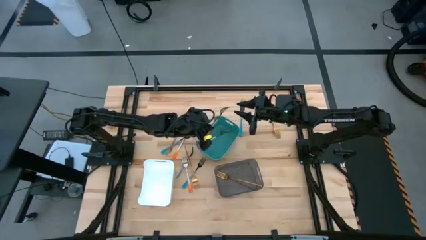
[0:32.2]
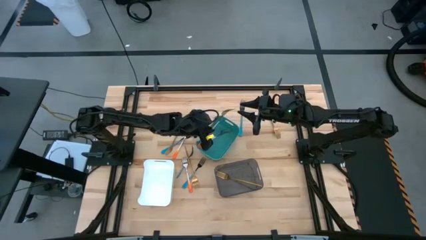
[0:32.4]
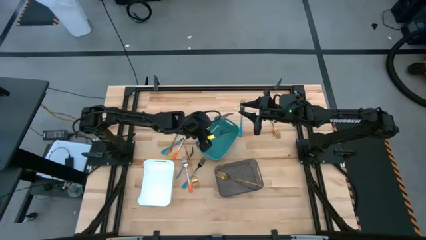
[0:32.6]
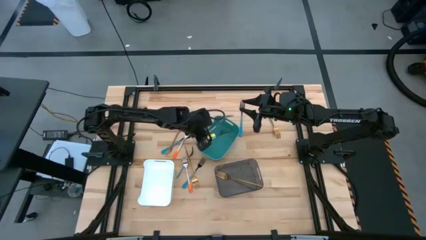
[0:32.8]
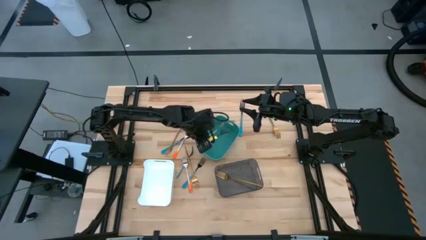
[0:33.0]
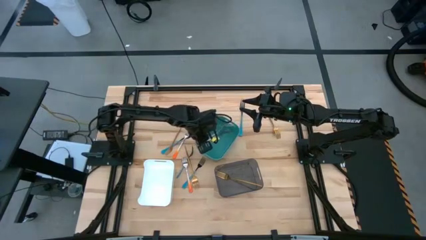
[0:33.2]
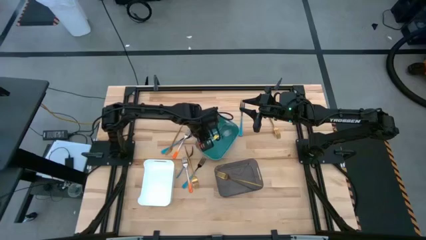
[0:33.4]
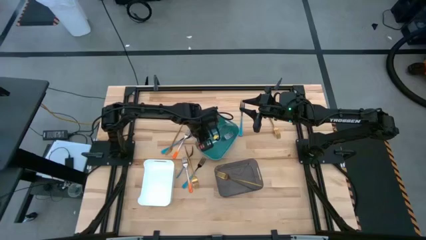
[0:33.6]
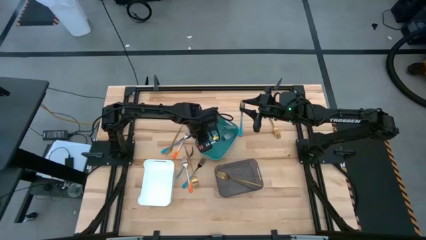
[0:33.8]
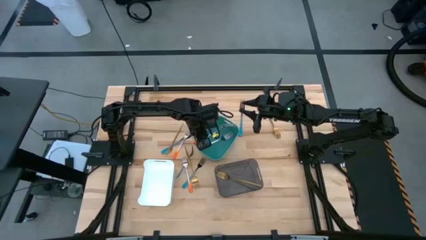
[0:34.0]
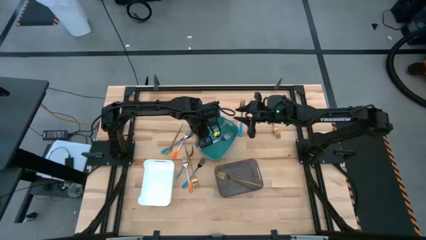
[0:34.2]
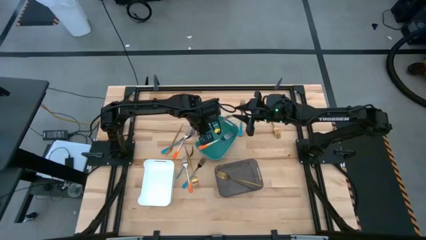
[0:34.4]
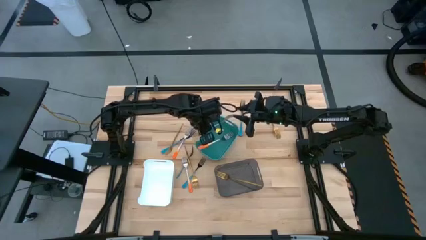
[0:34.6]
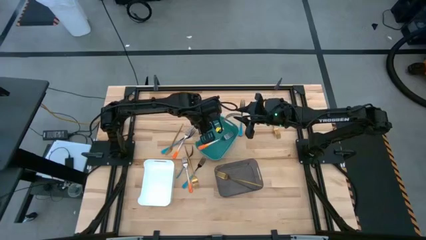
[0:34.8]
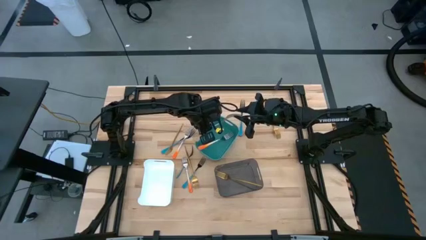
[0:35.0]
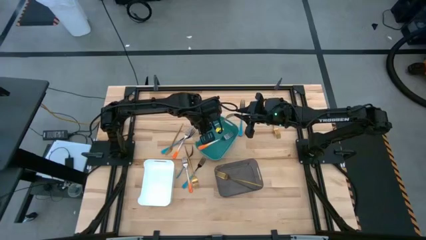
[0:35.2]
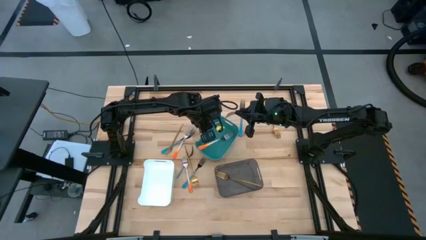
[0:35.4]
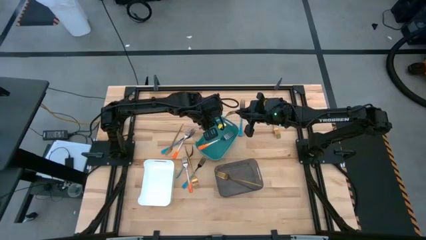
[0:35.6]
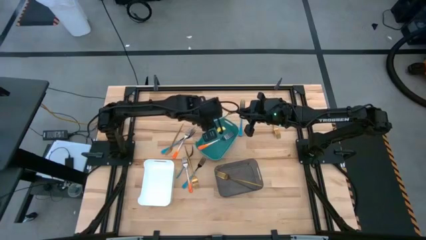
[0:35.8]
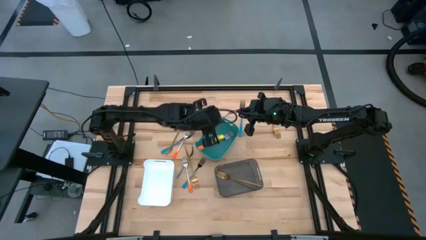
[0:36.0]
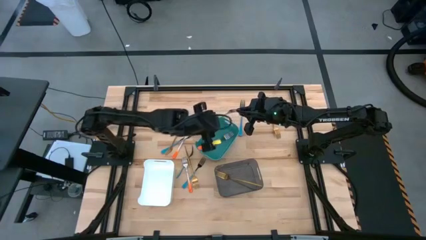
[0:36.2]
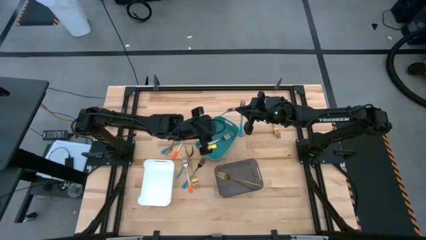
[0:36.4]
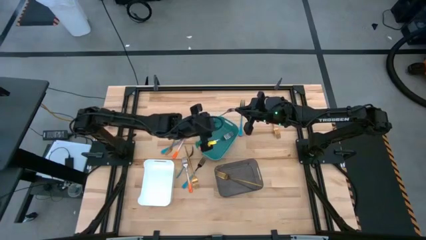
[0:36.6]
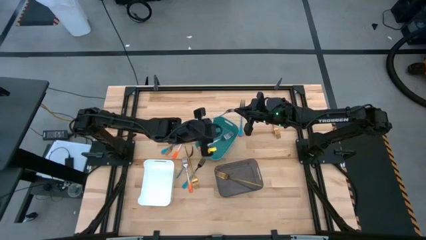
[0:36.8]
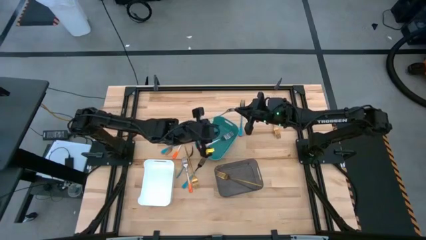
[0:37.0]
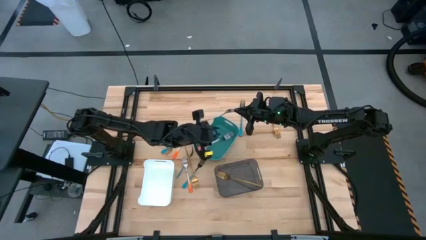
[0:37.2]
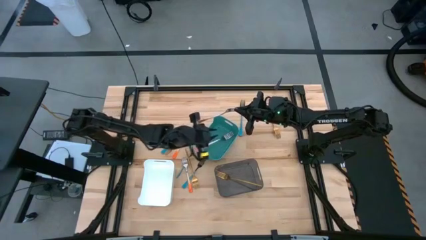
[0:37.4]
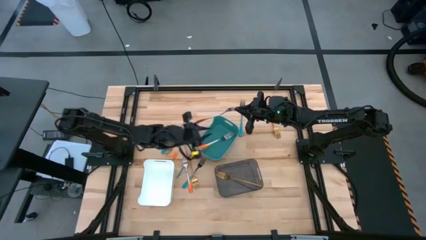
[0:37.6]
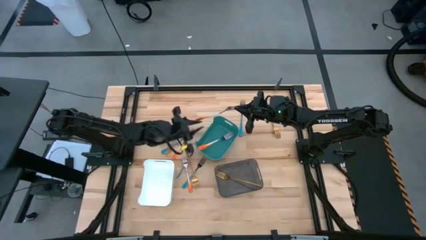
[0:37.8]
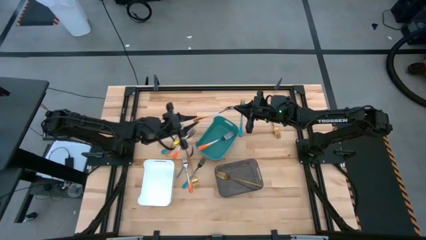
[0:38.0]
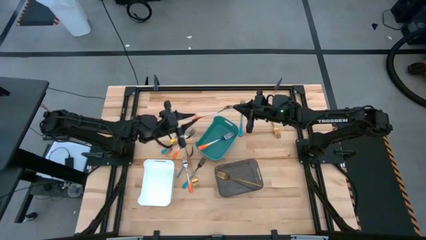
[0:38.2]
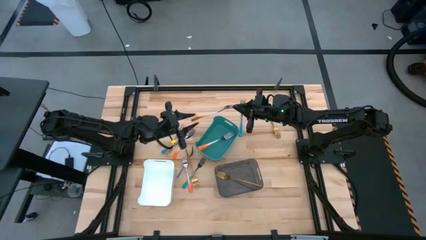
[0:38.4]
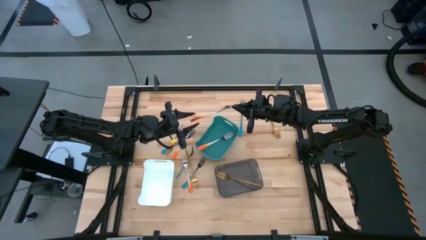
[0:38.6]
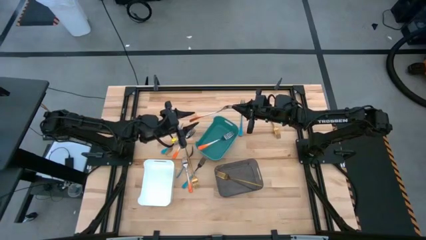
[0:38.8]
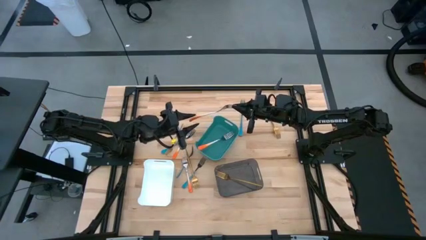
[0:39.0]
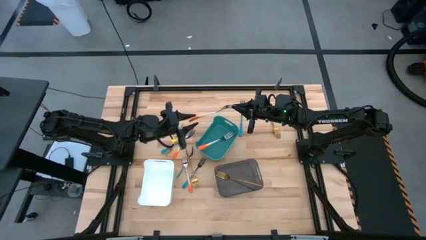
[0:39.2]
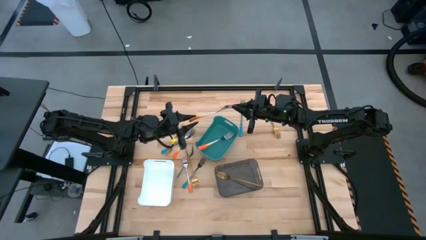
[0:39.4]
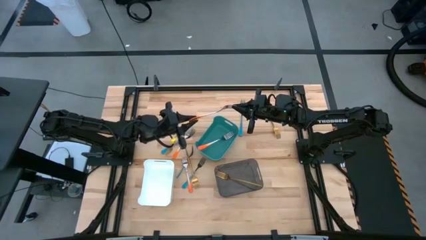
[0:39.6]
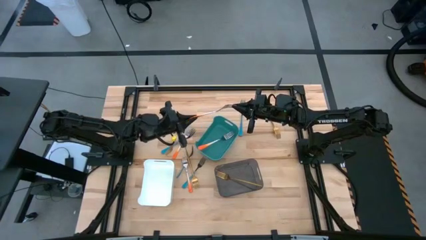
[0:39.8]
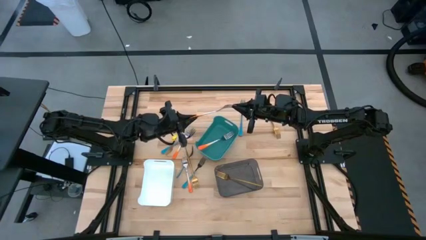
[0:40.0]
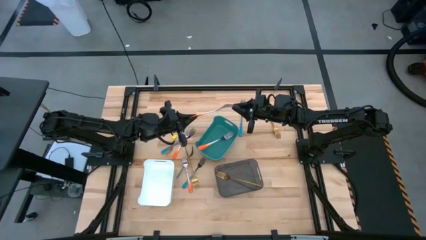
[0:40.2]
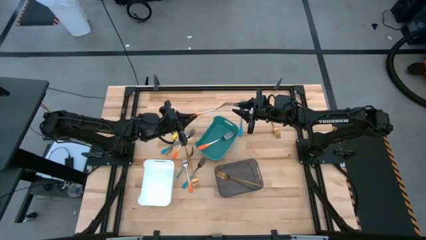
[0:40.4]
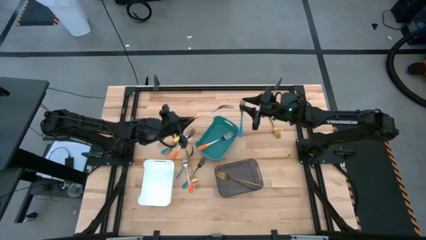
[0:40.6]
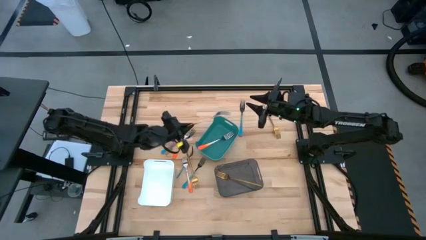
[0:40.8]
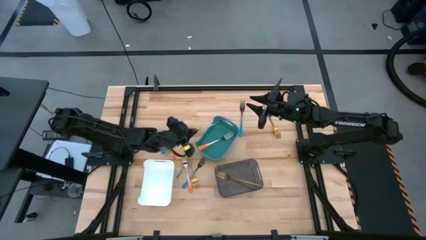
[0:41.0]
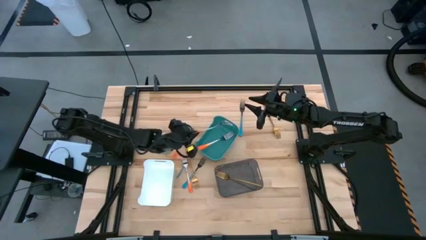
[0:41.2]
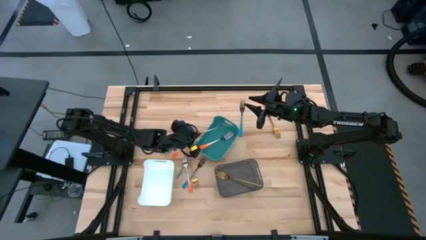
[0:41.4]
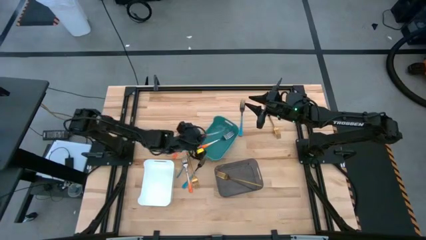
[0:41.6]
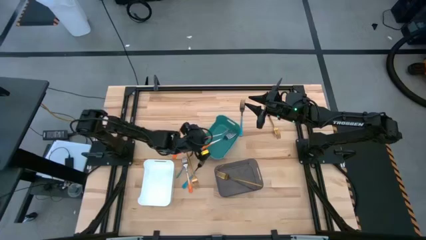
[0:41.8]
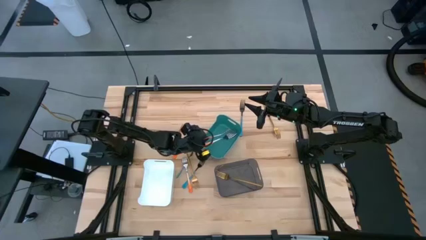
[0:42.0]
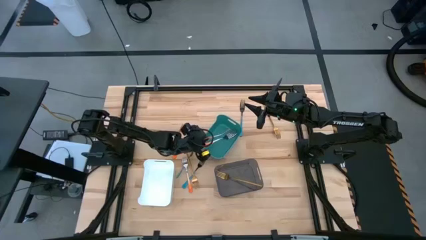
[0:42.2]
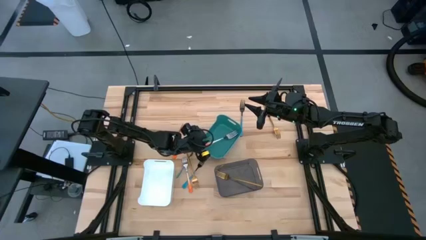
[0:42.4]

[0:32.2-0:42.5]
Task: Sort silverware by color (type)
Put the orange silver fork into the blue bin

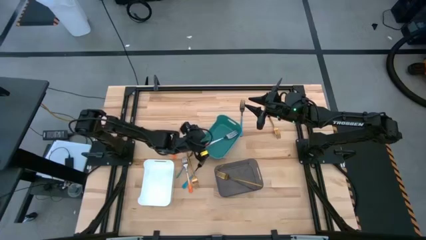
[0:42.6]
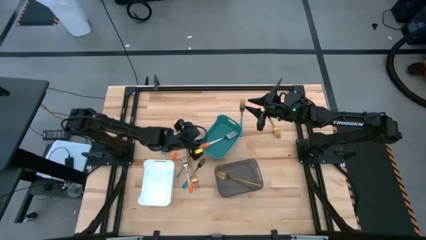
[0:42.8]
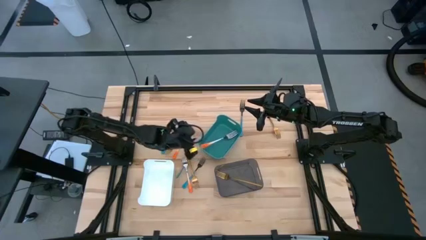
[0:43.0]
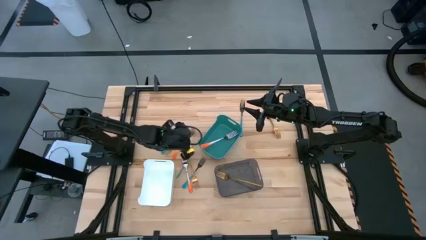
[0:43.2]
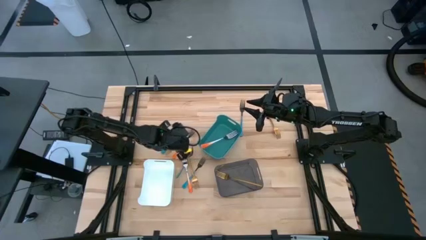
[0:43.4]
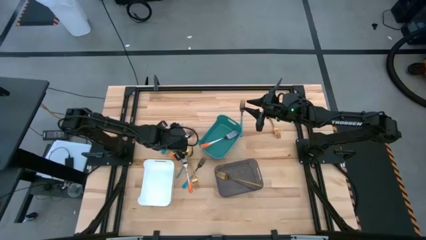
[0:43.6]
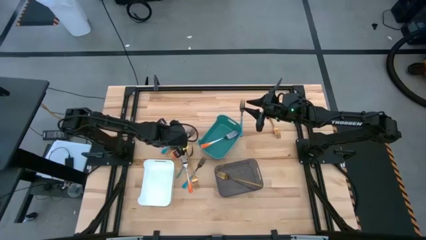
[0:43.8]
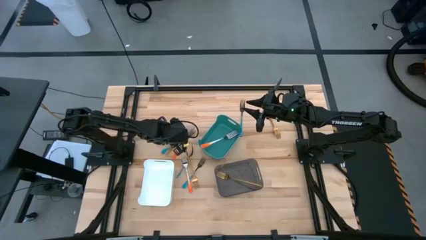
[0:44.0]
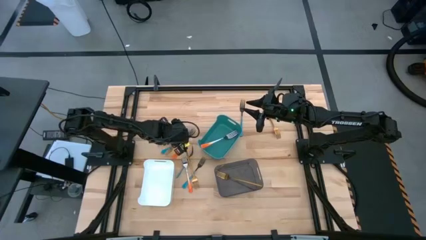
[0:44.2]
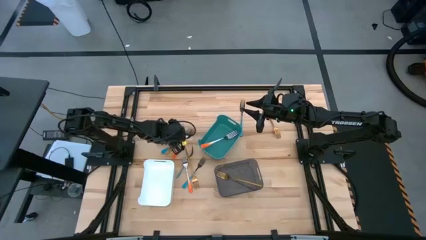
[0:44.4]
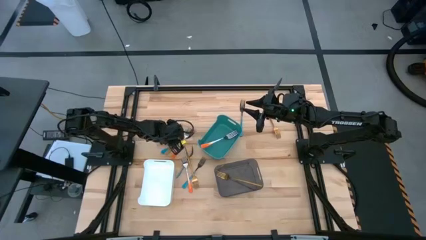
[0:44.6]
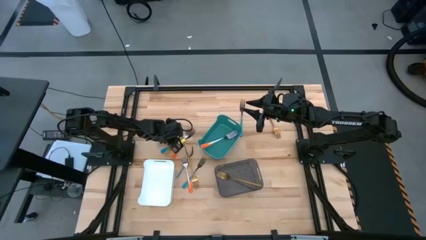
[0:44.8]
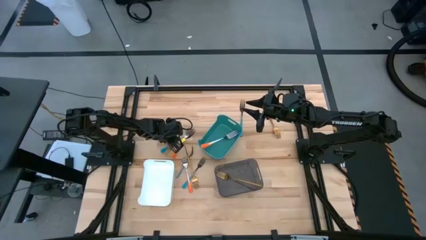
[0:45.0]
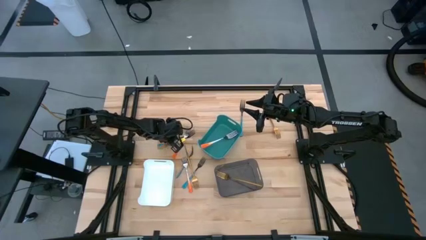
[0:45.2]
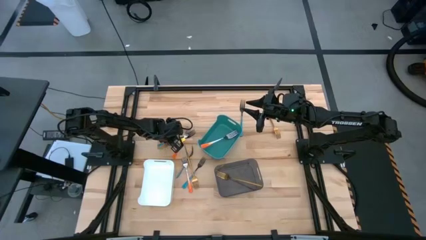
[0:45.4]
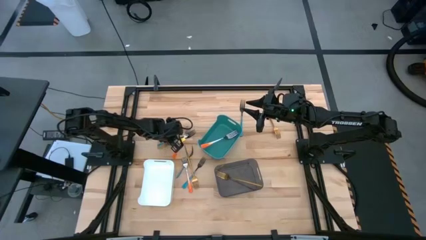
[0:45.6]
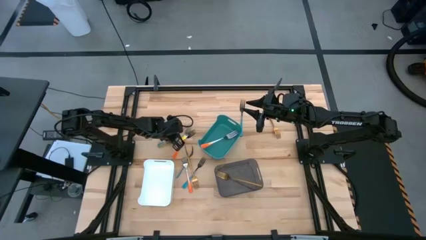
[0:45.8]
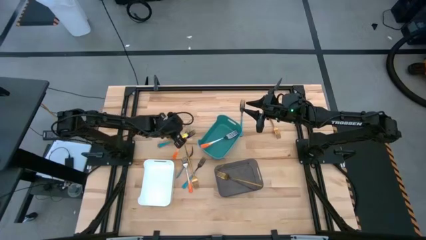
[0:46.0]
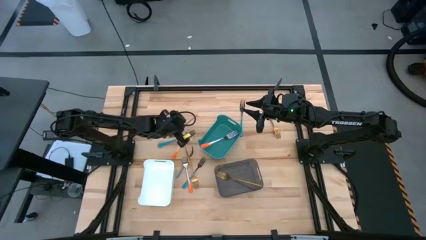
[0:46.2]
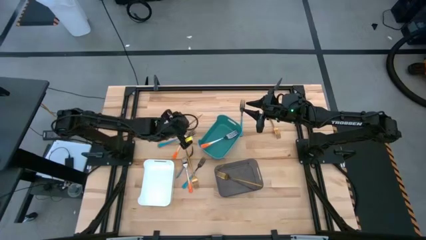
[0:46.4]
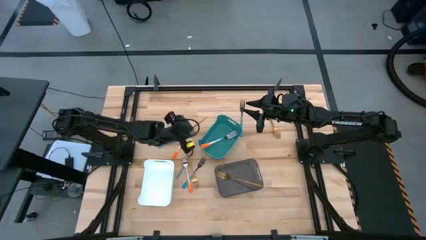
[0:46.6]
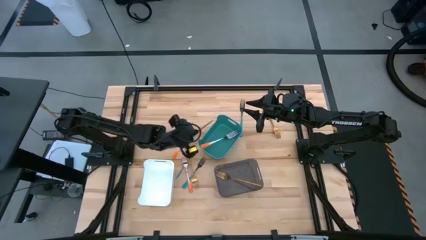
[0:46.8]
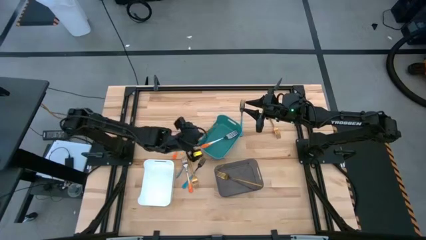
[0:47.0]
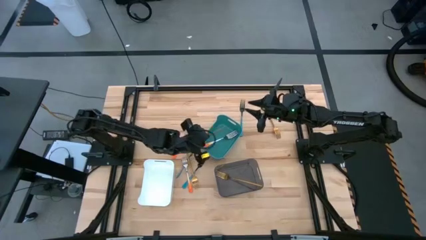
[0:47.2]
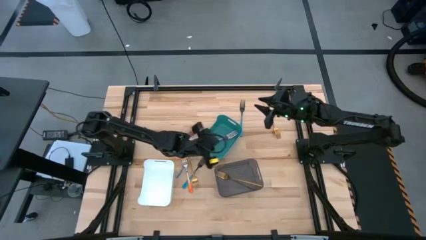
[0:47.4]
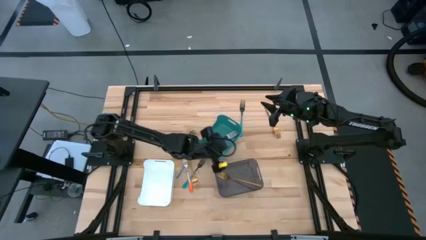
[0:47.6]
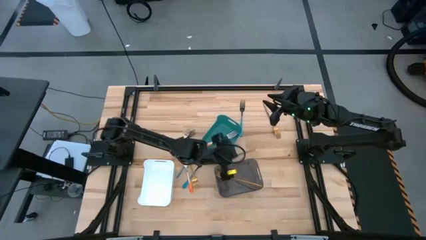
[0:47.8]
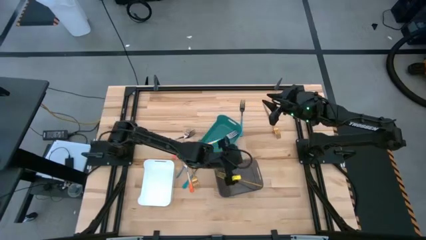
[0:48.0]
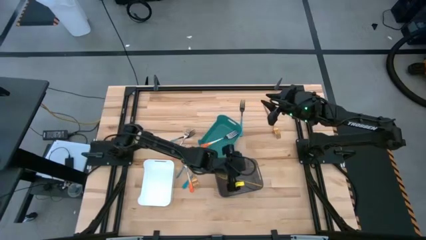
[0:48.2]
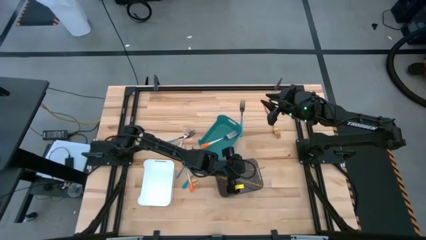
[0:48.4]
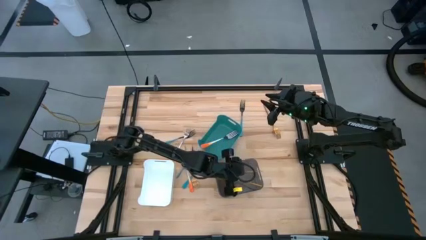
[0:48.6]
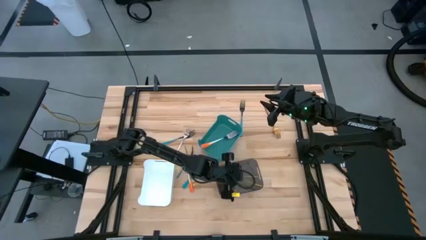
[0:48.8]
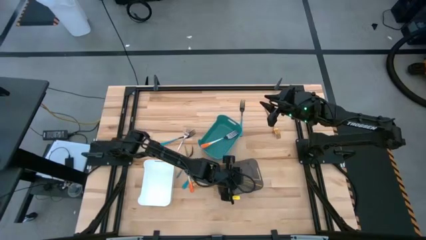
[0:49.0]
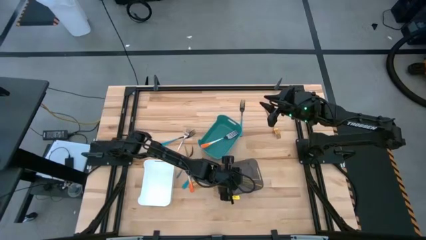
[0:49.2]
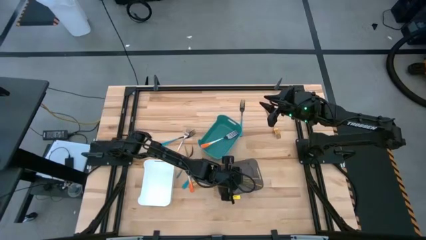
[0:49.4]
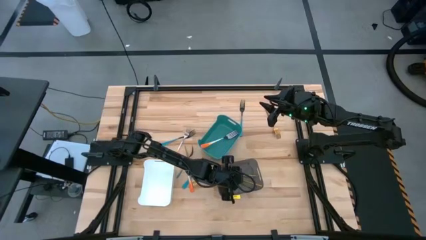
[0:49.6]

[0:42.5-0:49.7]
Put the gold fork into the black transparent bin
